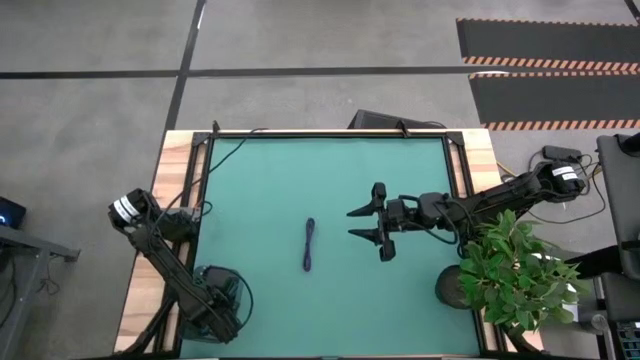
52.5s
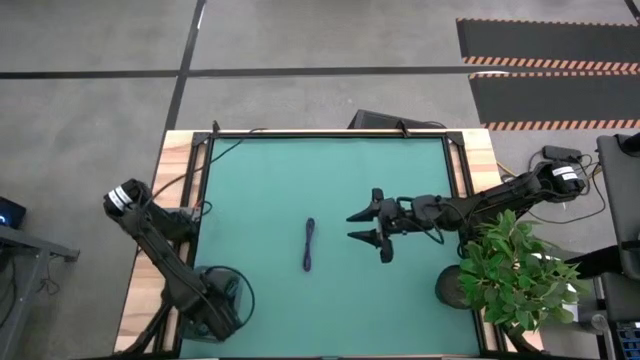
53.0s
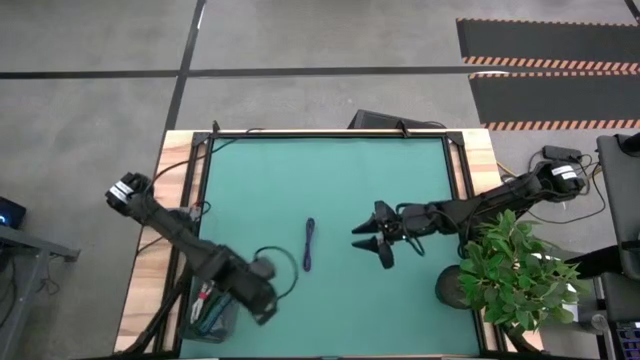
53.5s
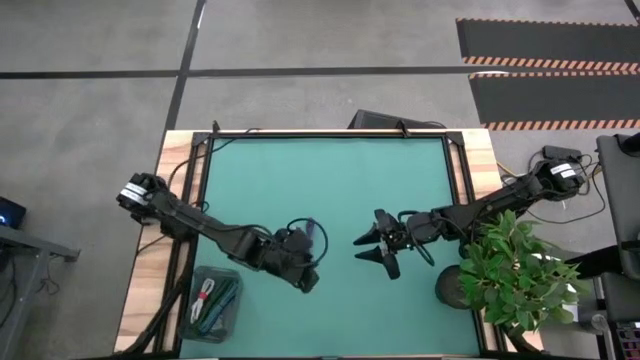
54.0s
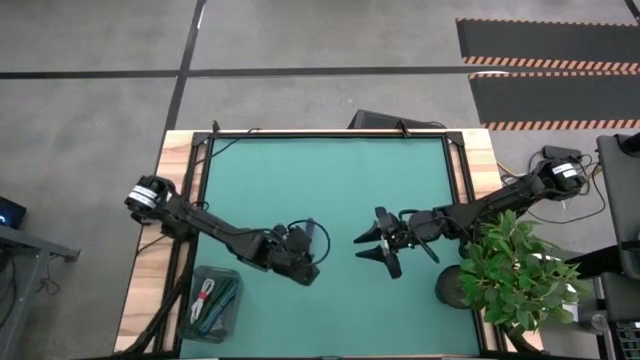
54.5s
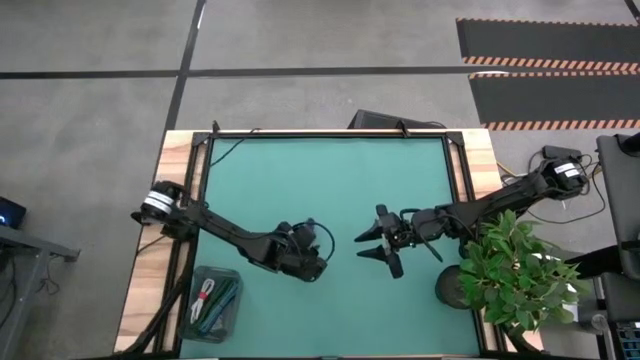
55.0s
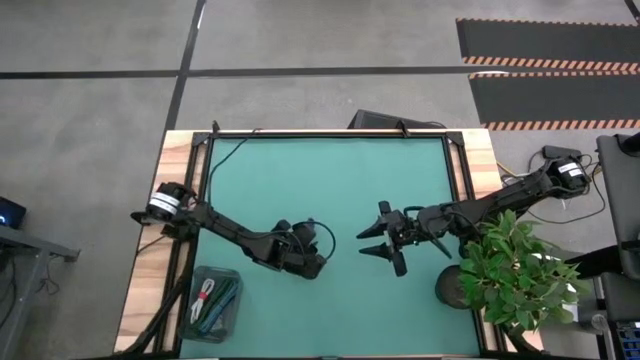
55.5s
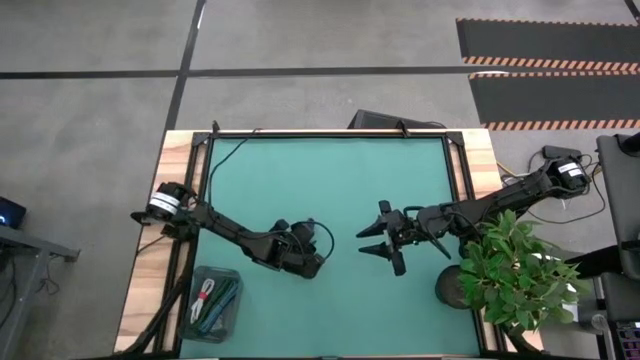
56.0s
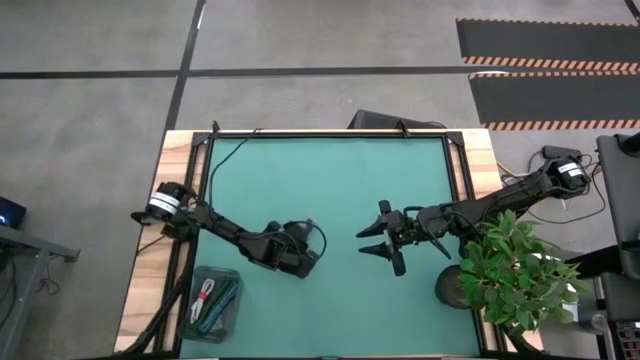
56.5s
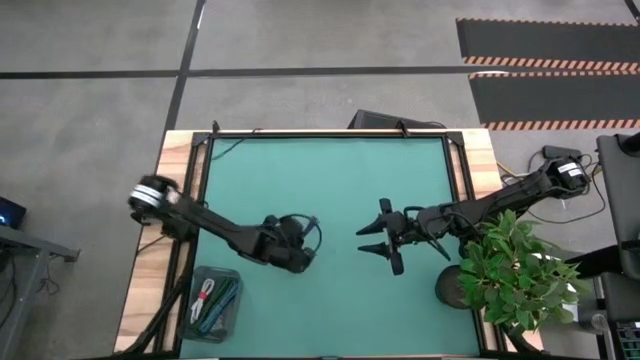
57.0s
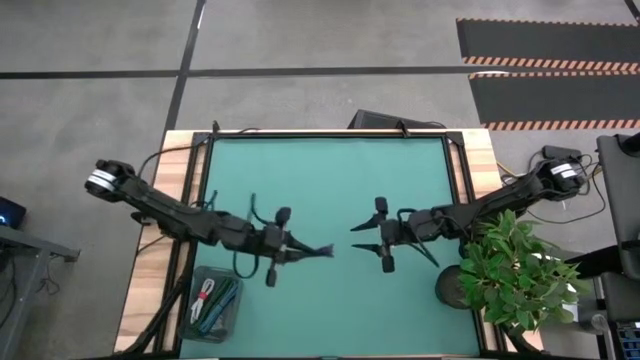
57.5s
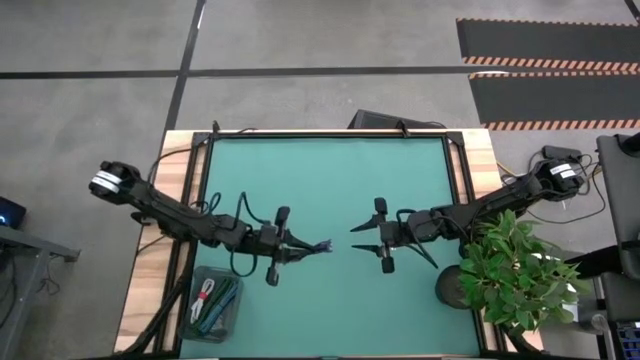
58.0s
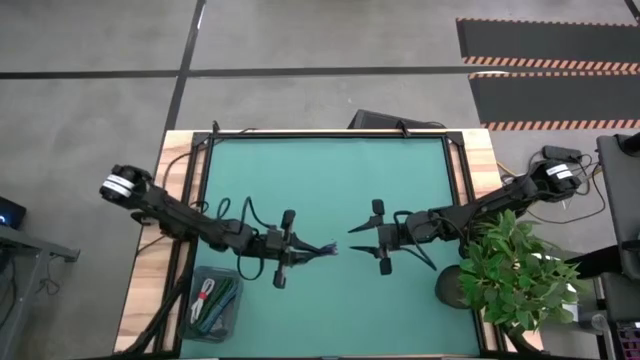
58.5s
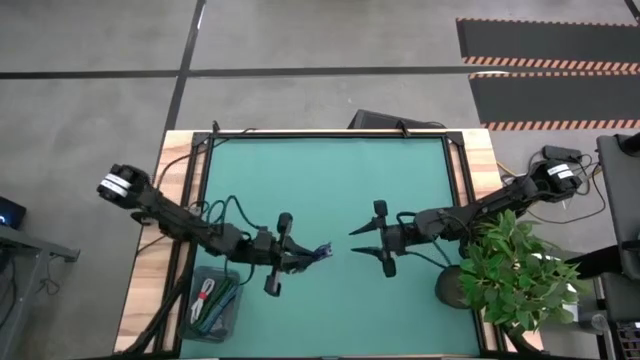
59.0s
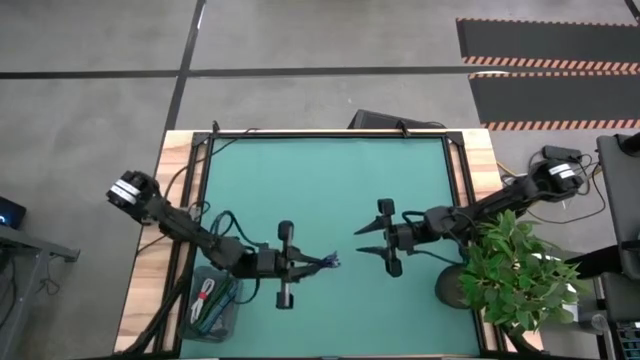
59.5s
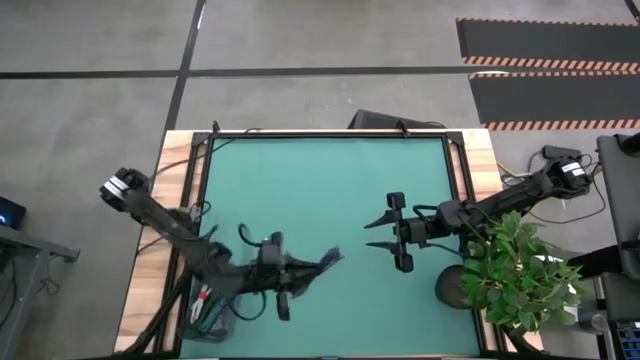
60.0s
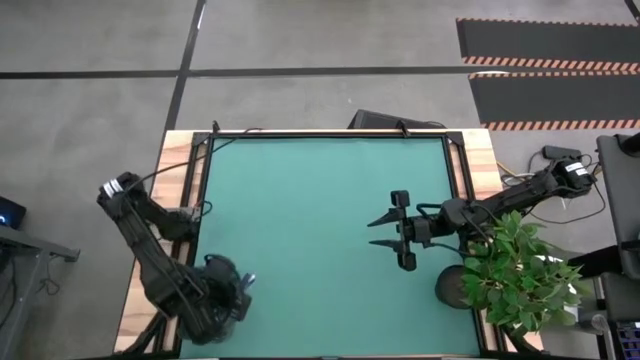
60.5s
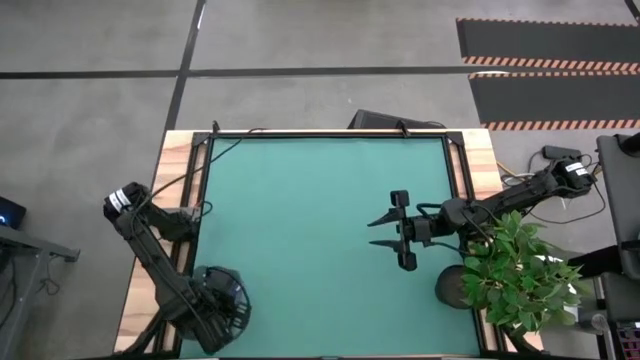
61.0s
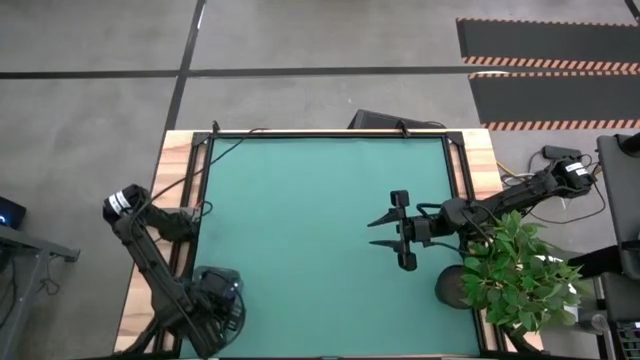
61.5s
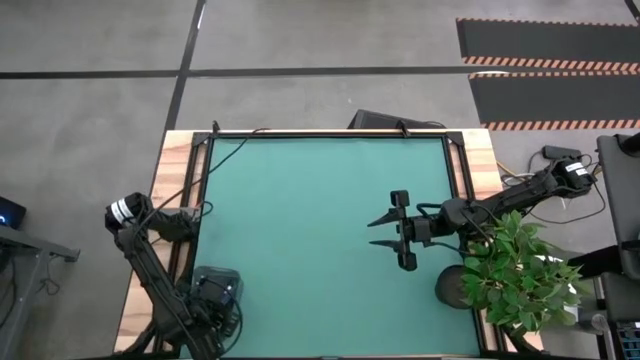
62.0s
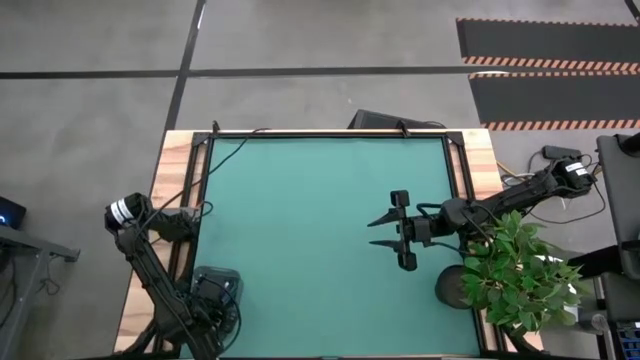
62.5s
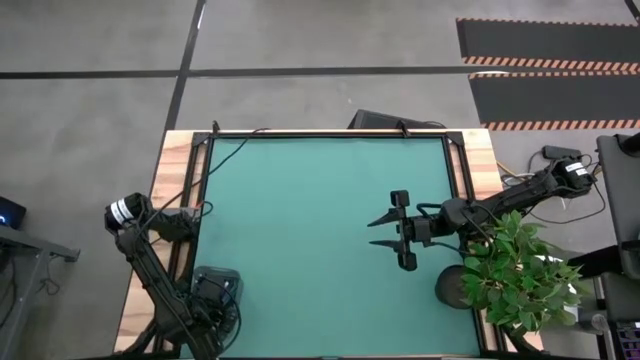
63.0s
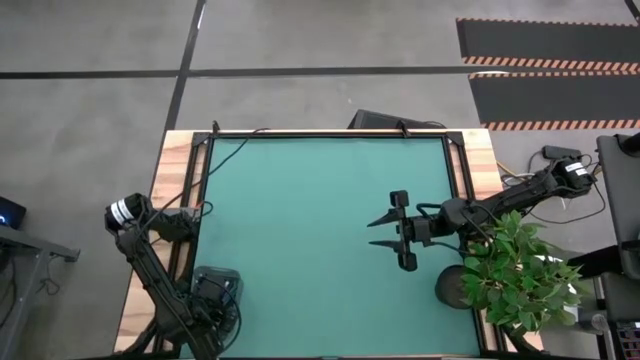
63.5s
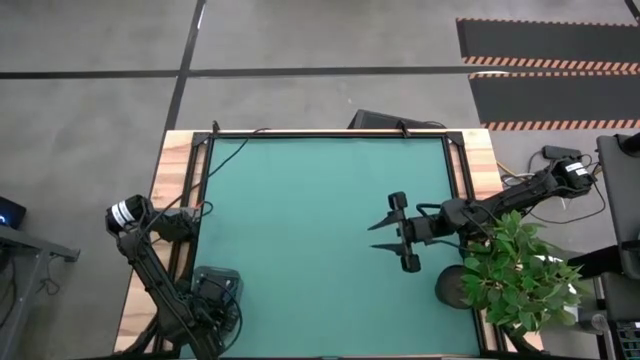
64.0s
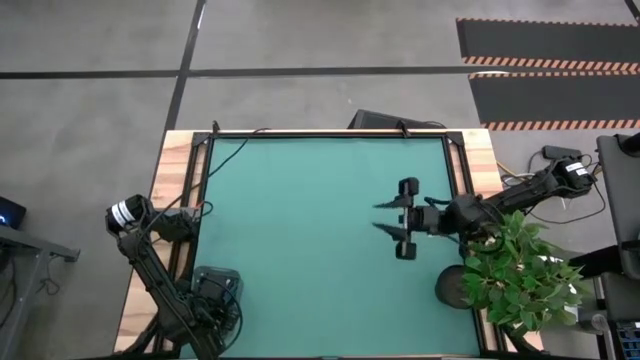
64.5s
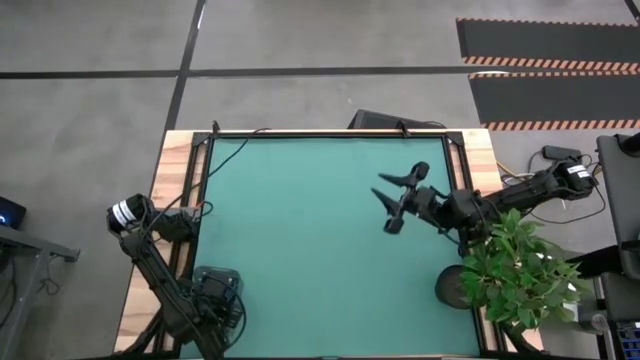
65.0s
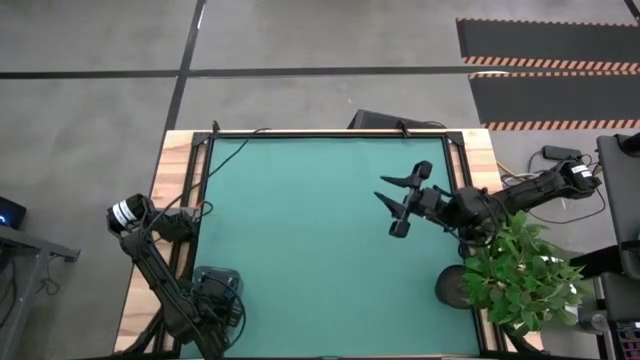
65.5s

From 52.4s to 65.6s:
Task: Pick and place USB-C Cables
Put the purple charger cable into the gray bin

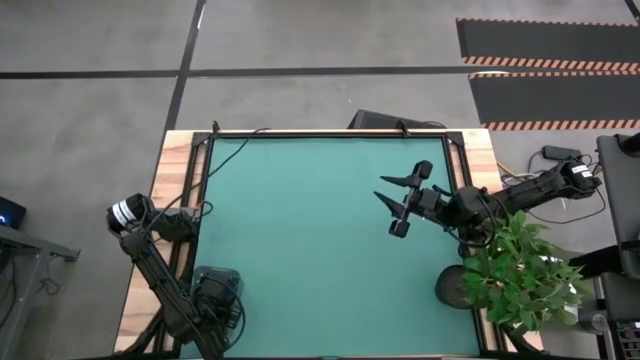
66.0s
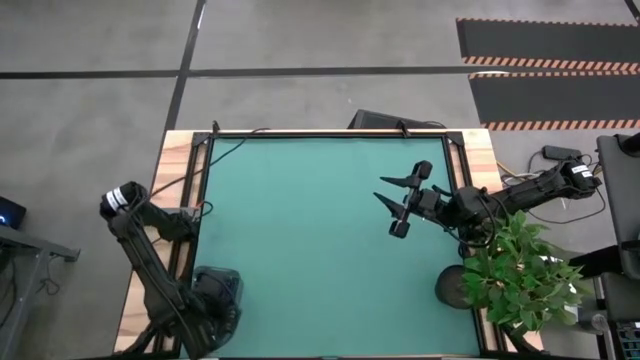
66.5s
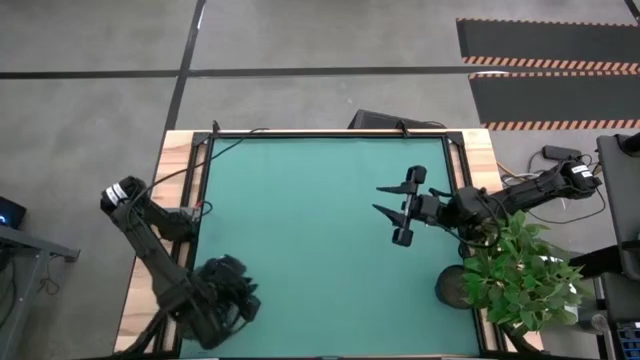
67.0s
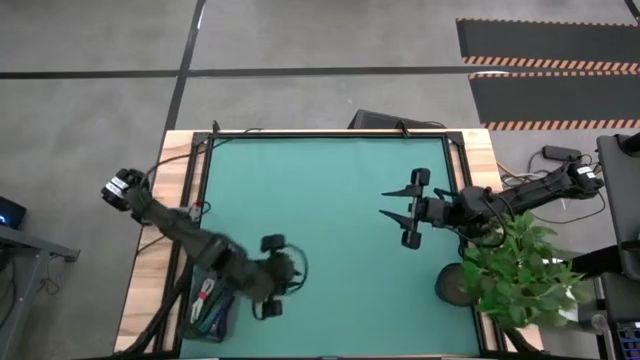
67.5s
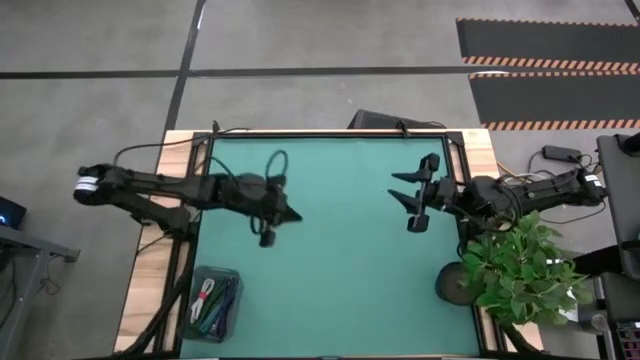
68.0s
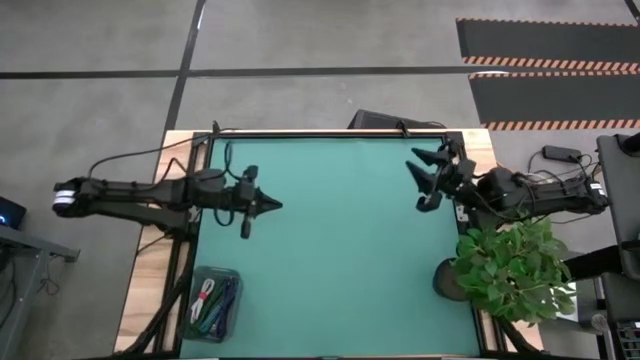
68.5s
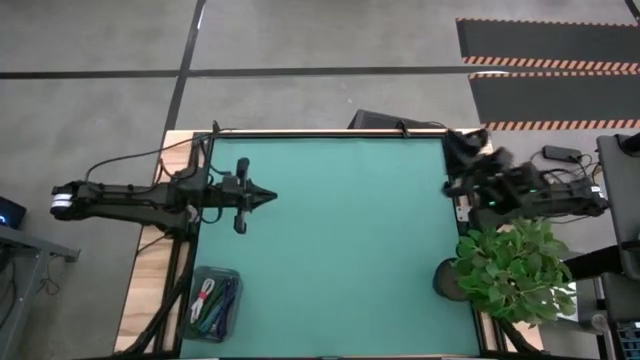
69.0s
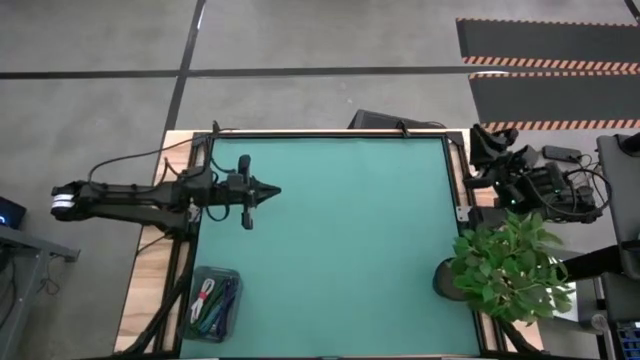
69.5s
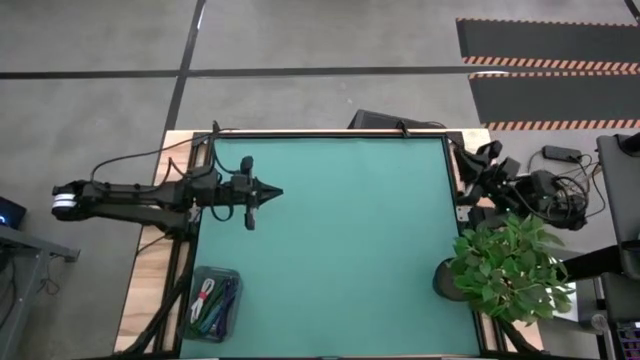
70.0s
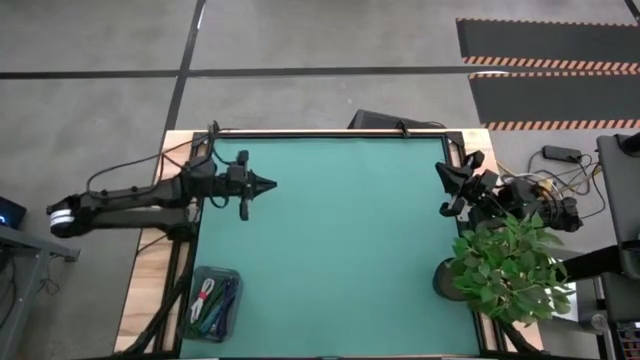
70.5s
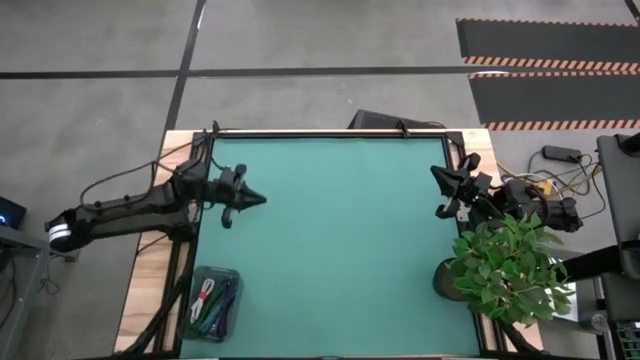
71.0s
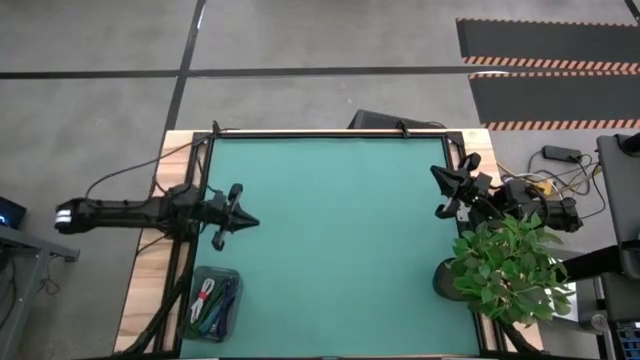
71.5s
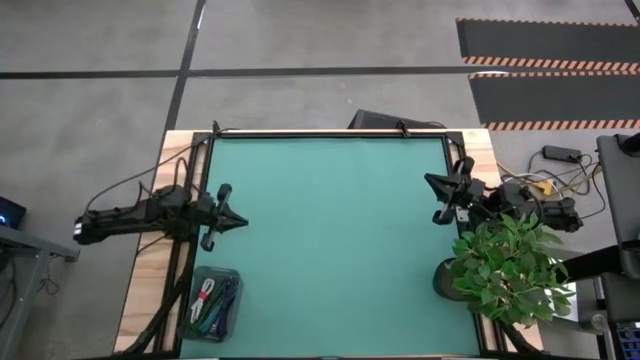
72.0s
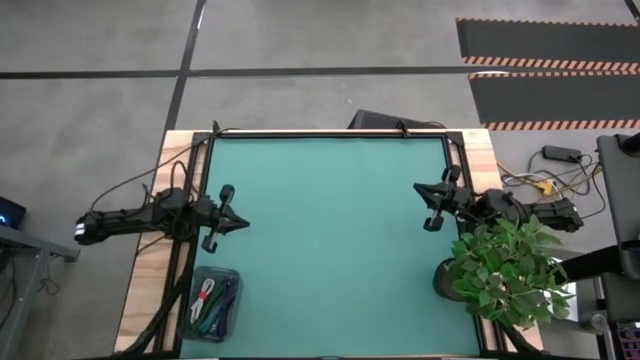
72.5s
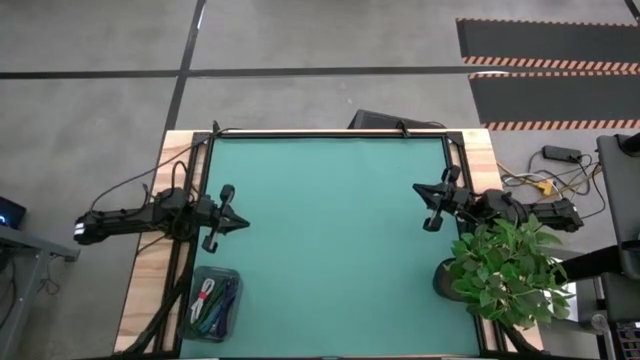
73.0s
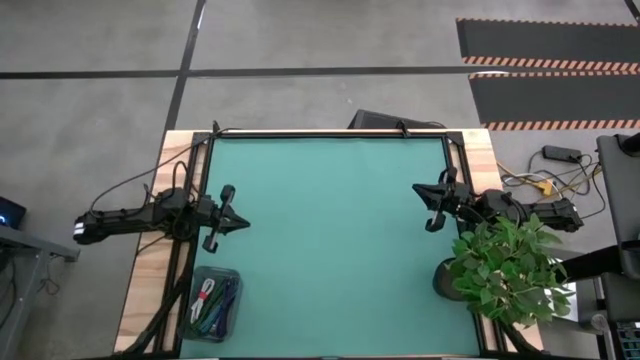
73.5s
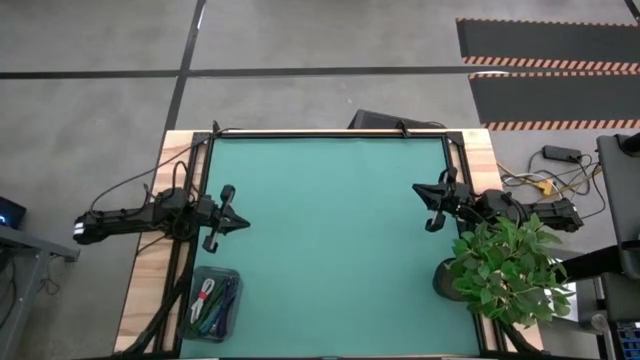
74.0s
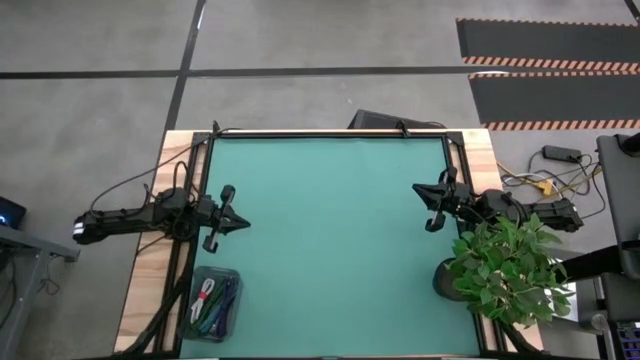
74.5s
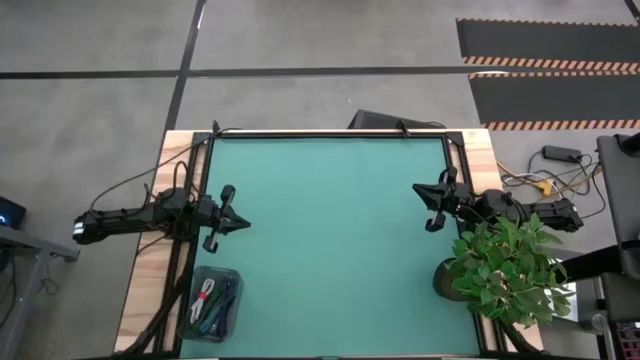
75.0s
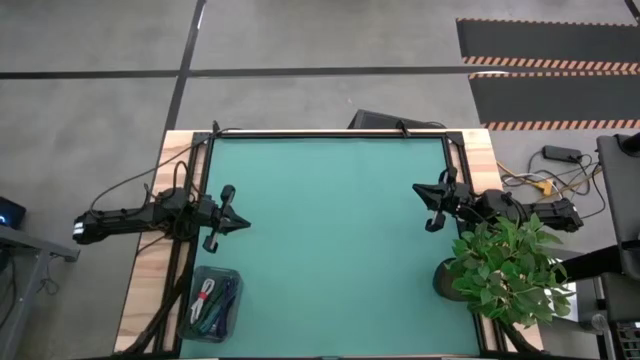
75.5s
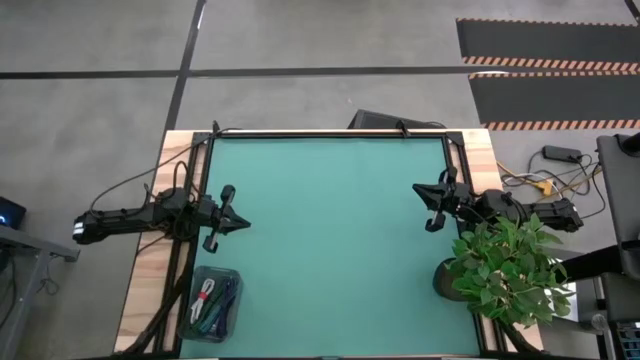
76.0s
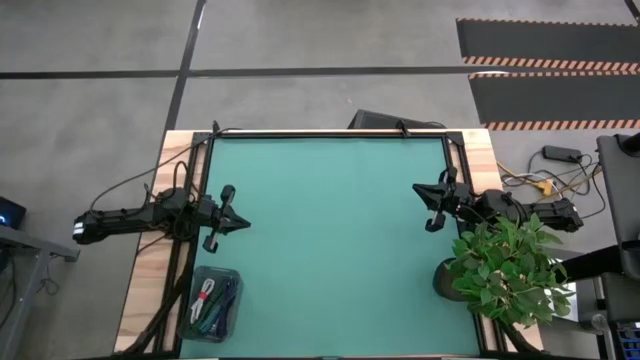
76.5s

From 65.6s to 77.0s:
Return to Home Position
